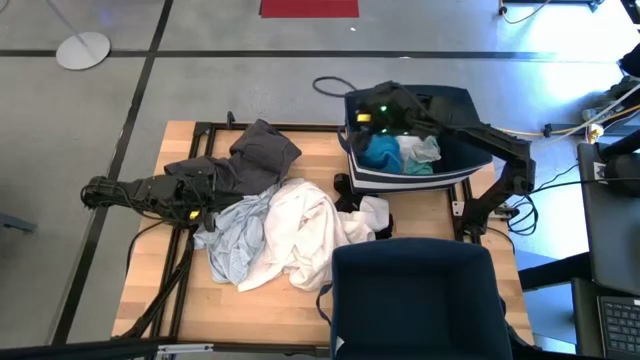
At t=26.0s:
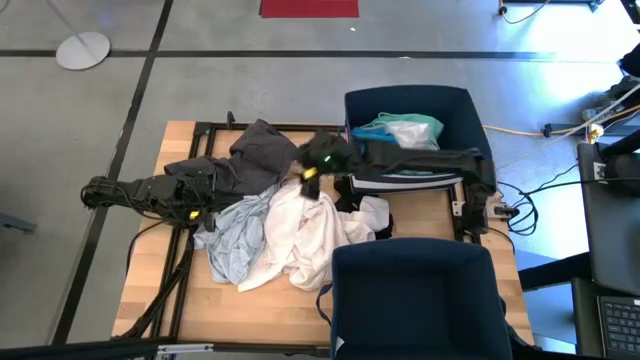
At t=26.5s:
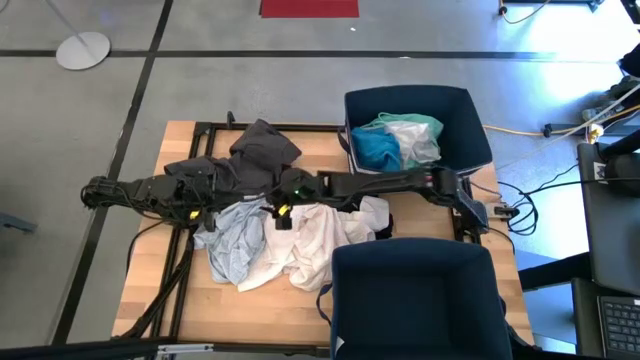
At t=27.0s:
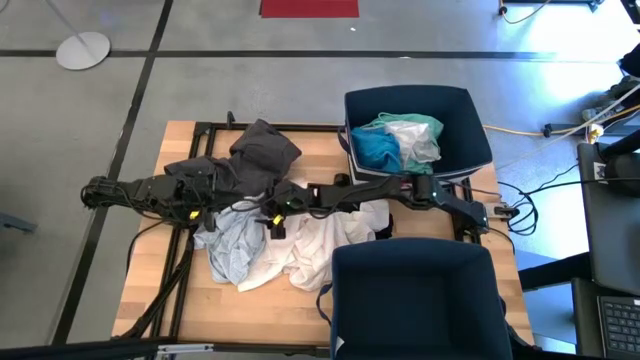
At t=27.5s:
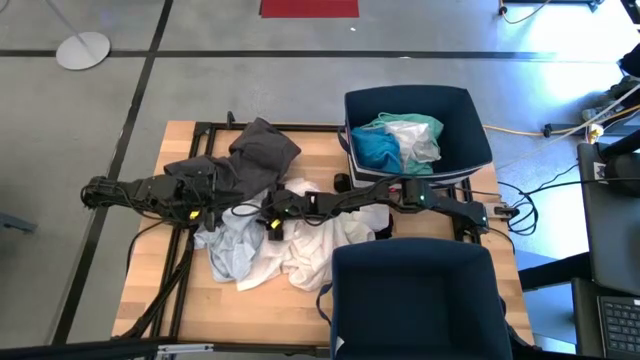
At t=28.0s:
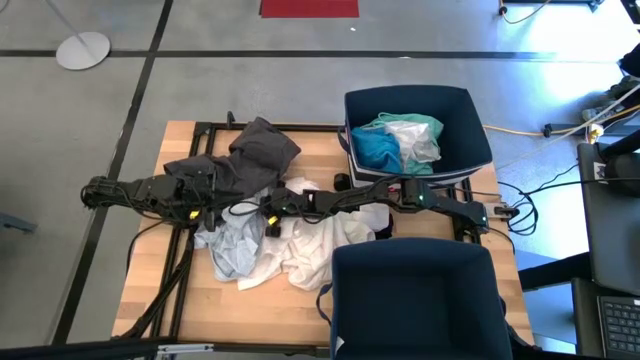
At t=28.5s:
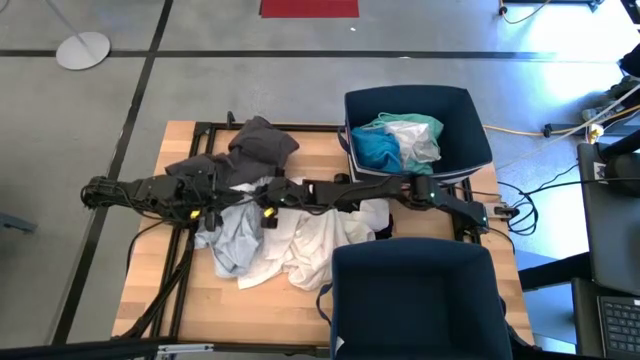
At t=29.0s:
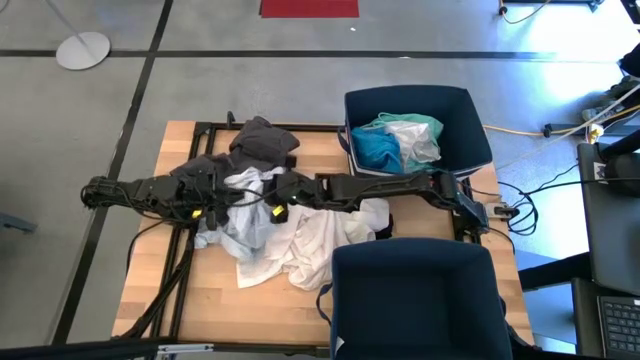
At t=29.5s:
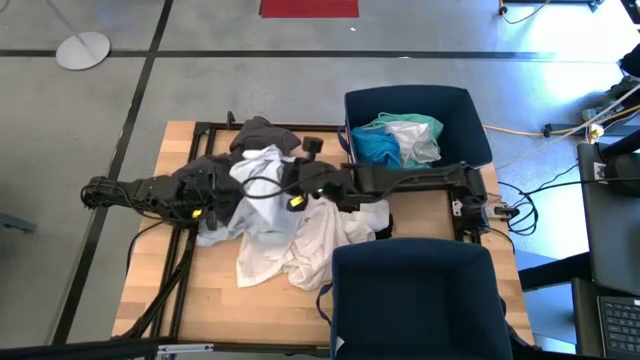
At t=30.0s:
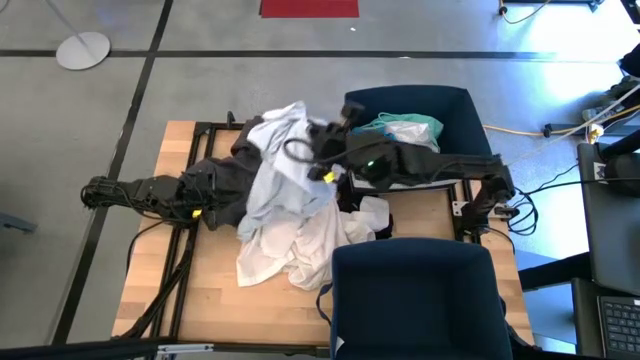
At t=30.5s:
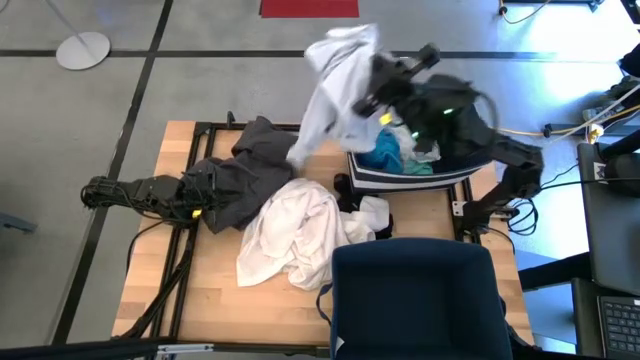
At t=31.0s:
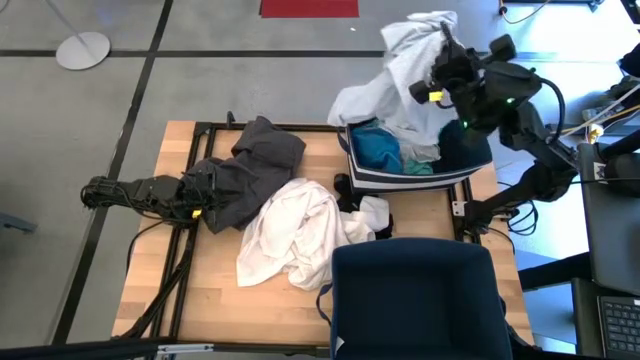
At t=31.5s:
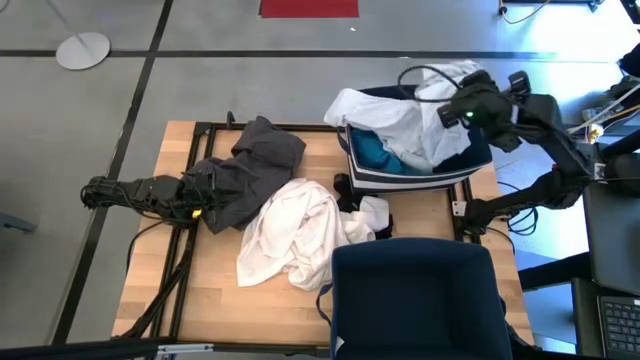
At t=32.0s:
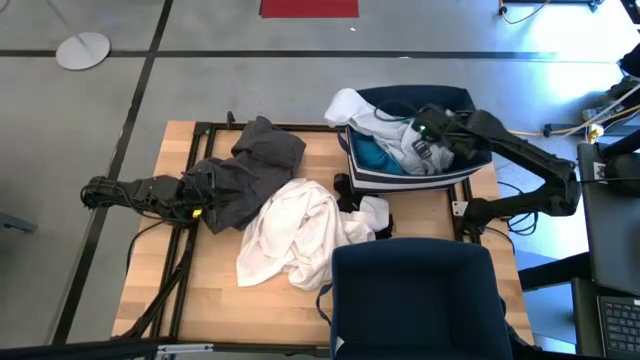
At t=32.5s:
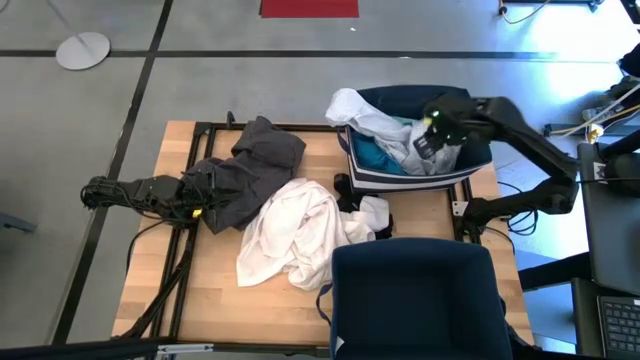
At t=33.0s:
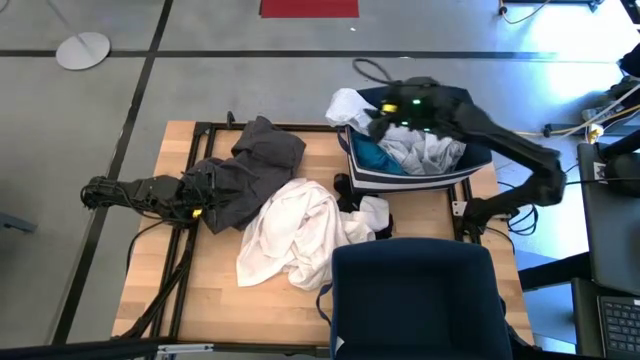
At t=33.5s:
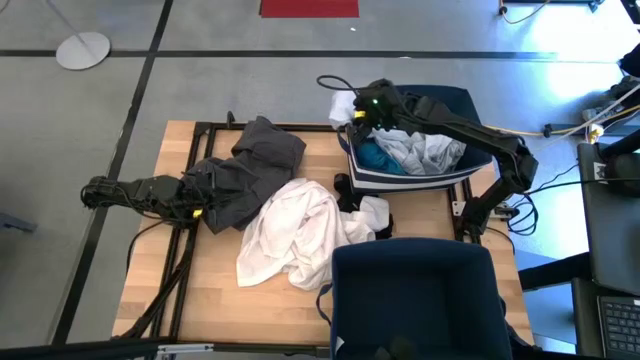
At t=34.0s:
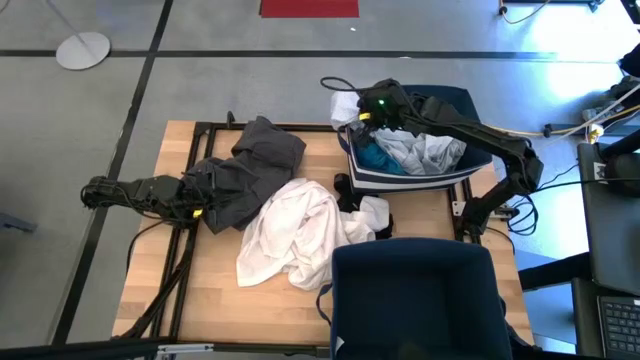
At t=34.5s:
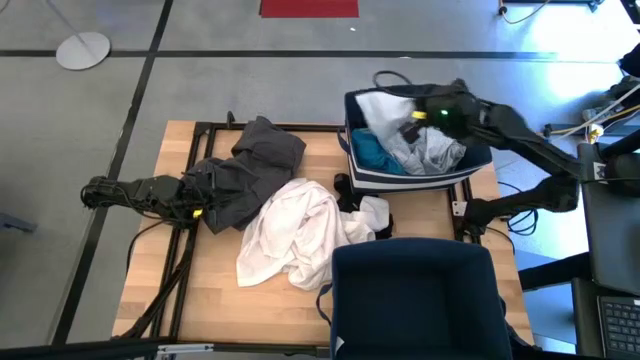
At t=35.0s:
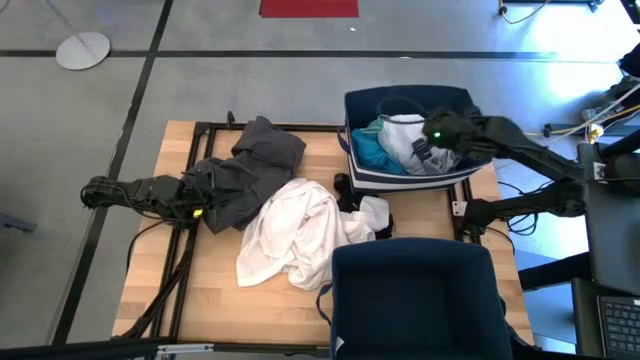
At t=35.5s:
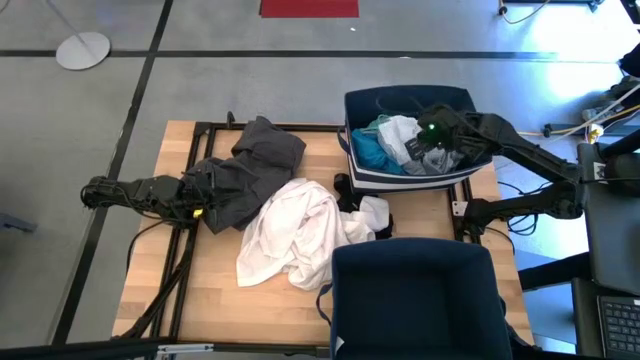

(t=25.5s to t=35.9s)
Task: Sort clothes
Put the white pattern shirt into the top laundry bin

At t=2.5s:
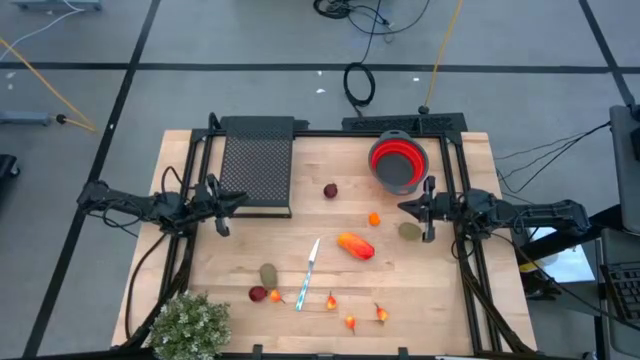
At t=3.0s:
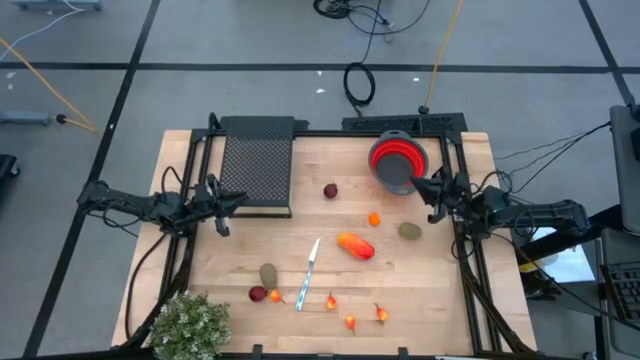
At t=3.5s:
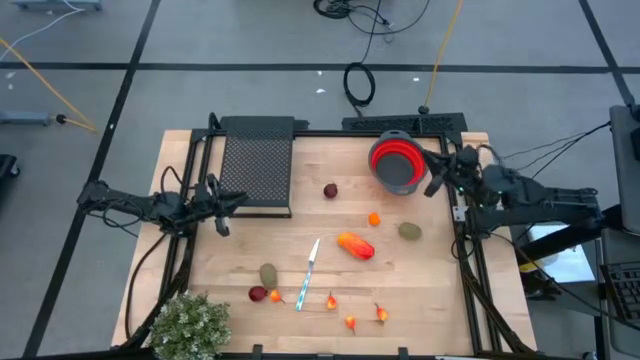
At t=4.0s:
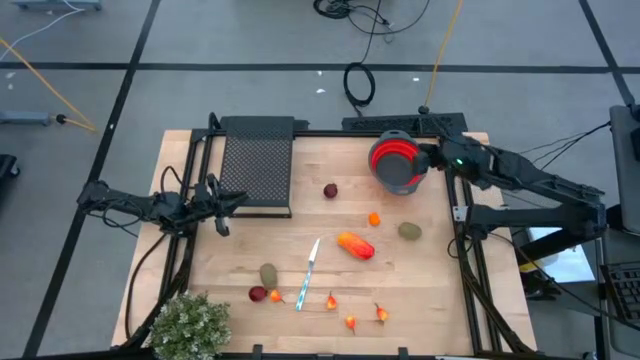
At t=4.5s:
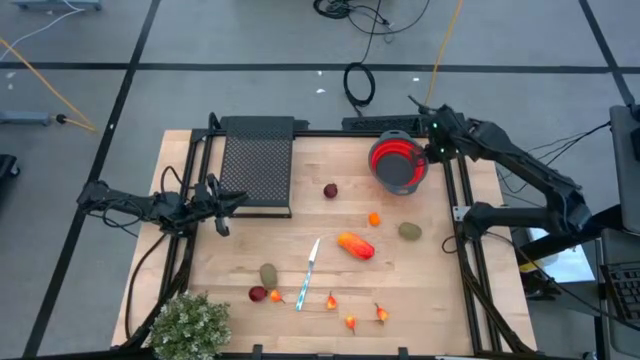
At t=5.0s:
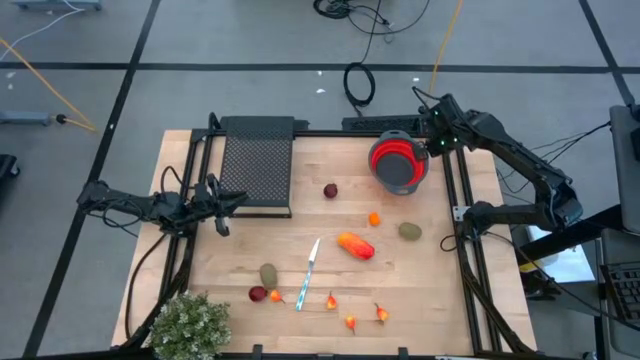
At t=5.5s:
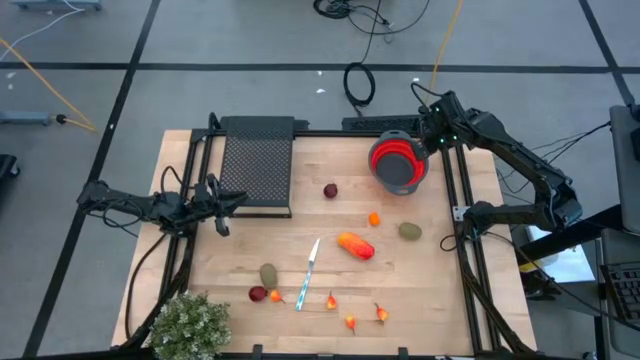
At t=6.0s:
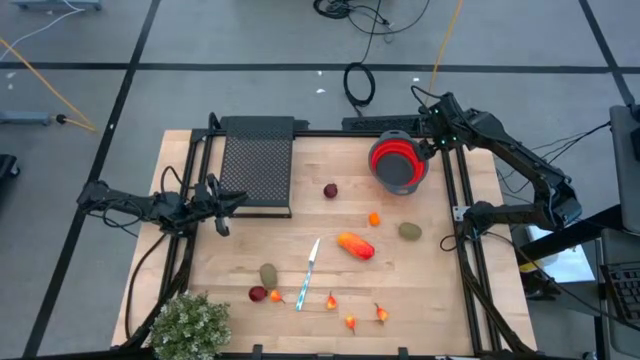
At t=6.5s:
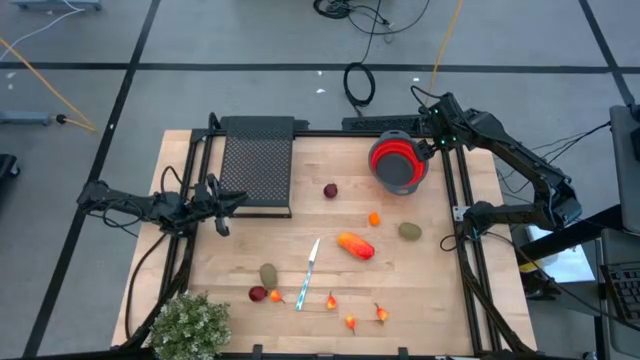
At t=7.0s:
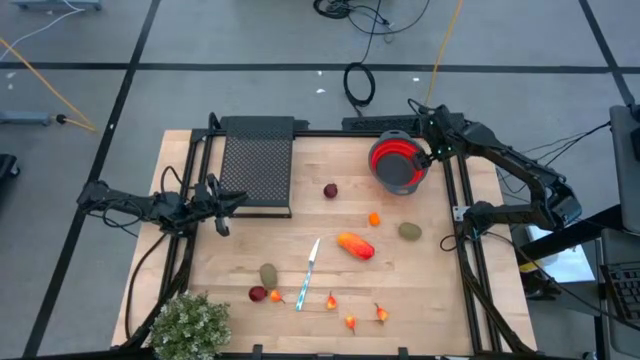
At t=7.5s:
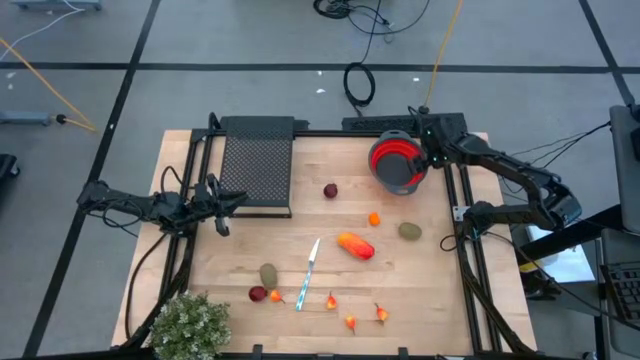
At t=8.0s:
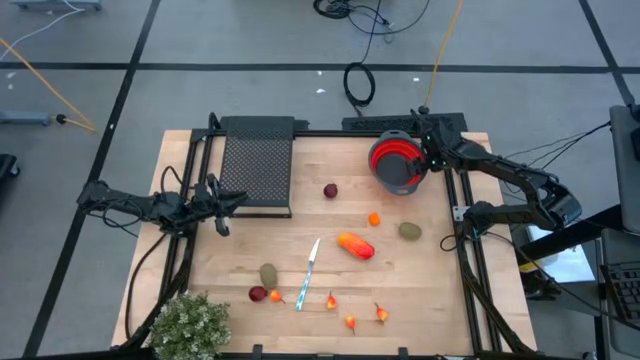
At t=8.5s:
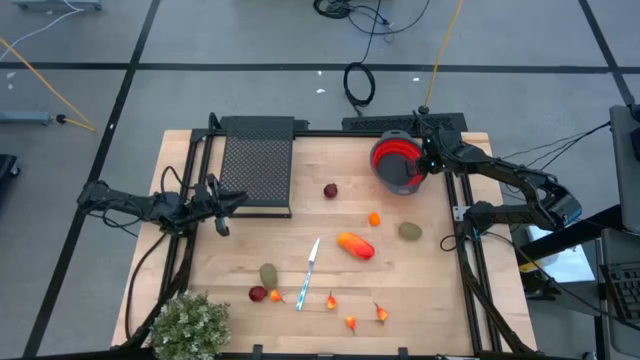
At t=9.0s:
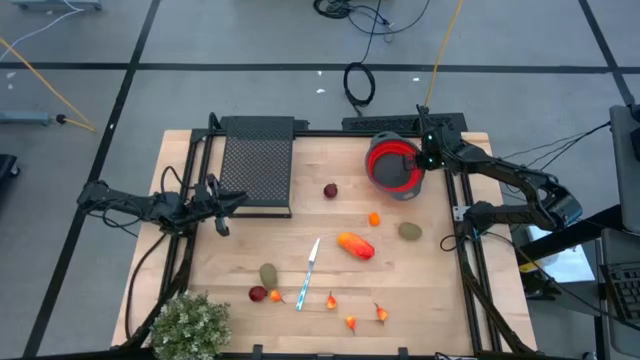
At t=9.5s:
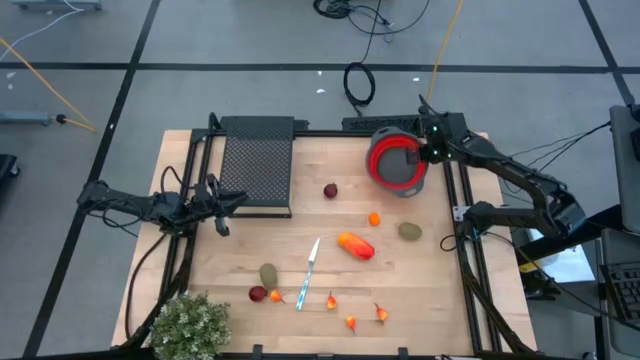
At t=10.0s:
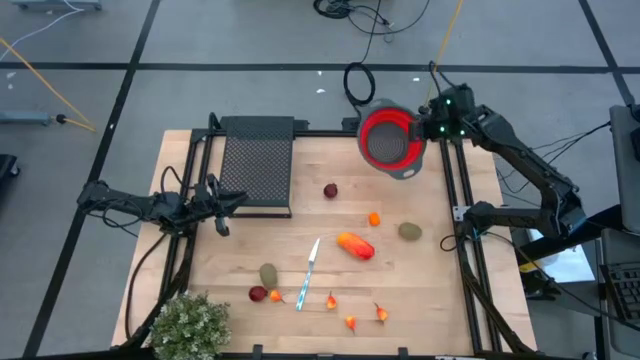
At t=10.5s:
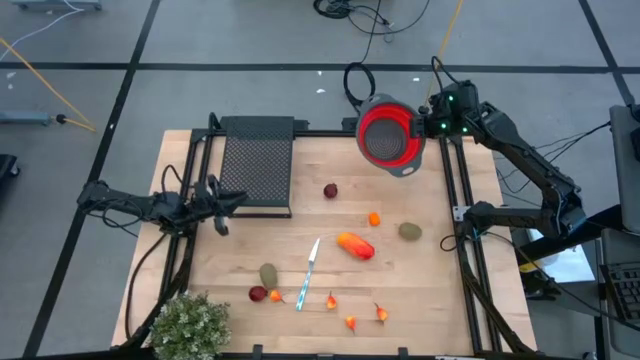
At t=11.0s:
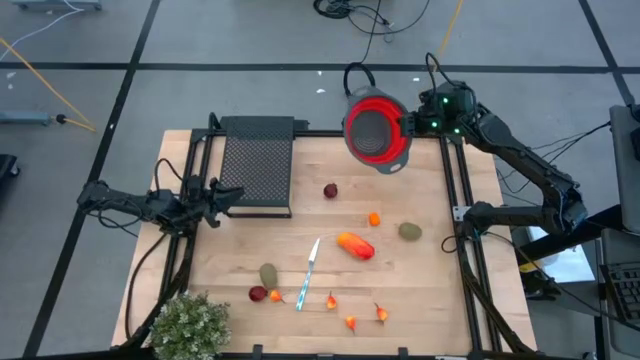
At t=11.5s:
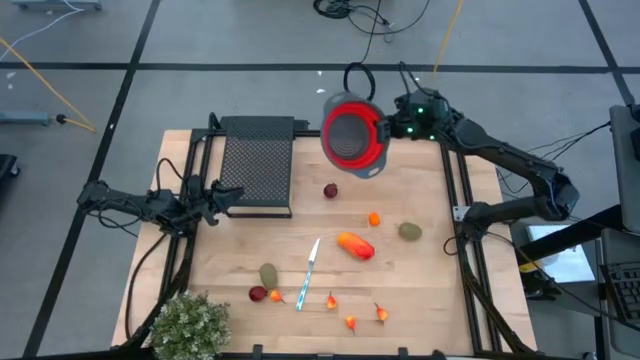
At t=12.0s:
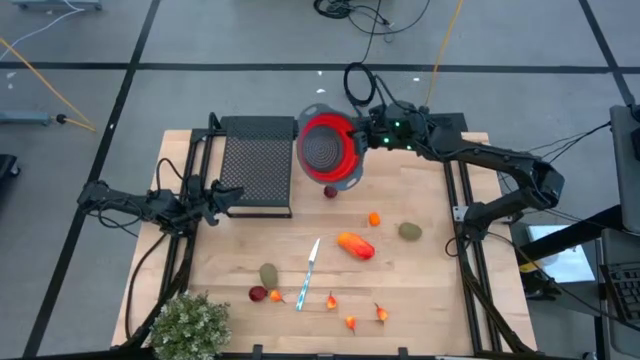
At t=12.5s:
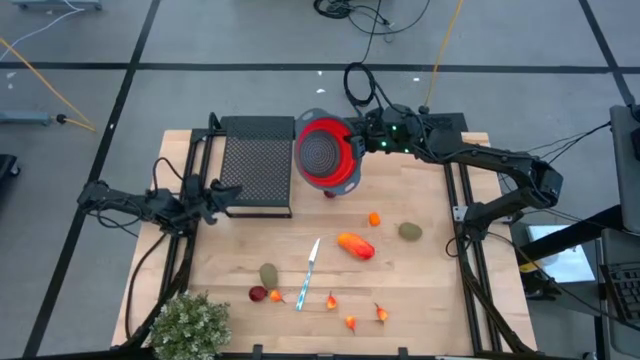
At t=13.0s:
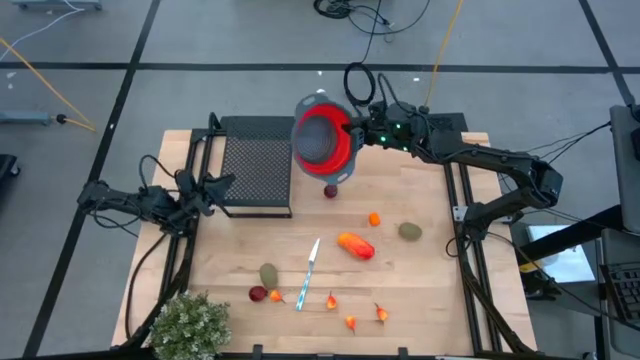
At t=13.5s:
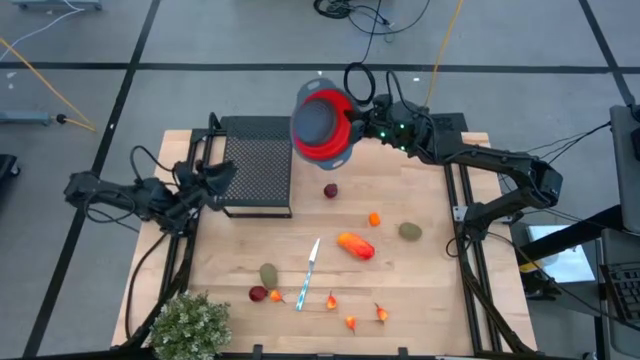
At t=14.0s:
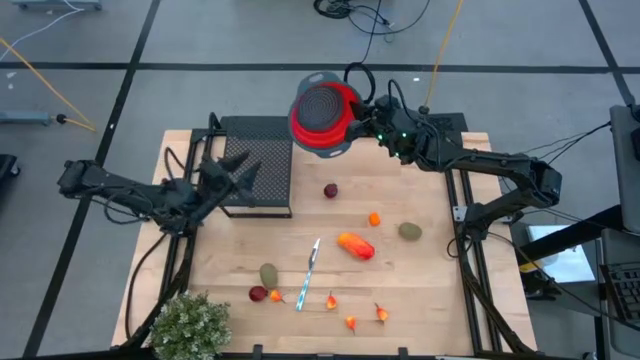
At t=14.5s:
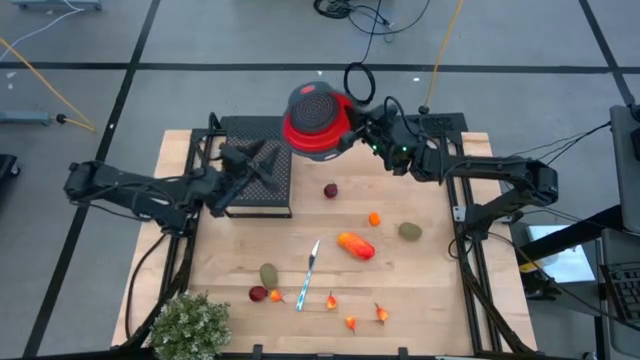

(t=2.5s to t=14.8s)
Task: Pick & Place Fruit
Put the red strainer bowl on the shelf
